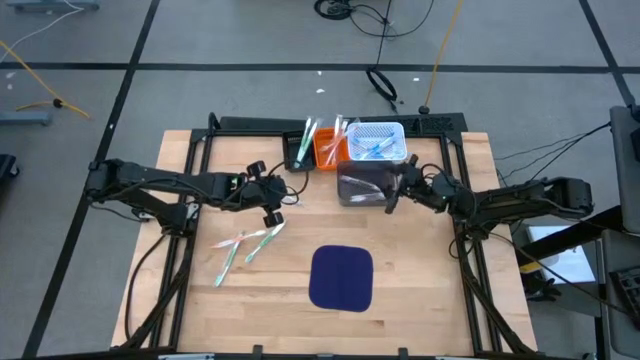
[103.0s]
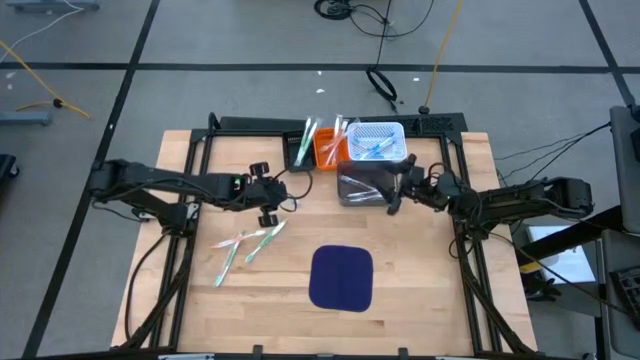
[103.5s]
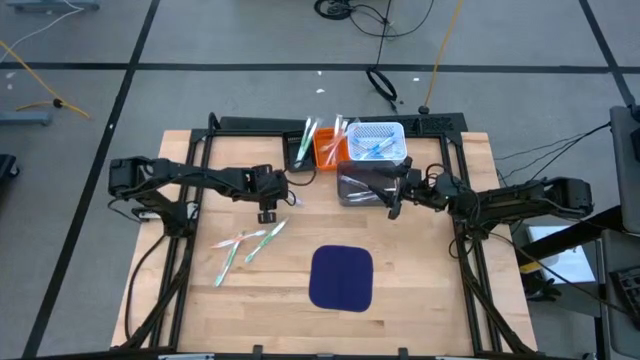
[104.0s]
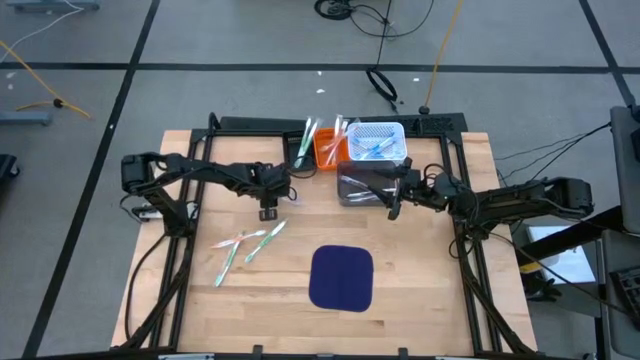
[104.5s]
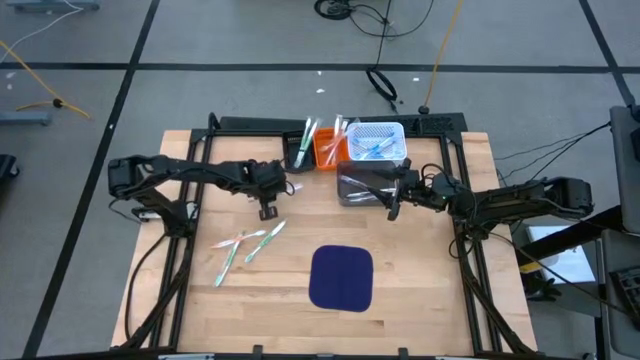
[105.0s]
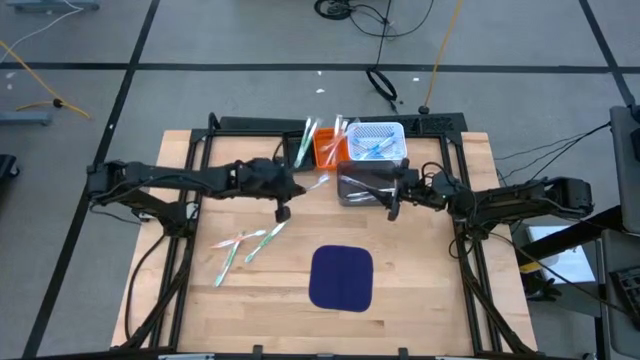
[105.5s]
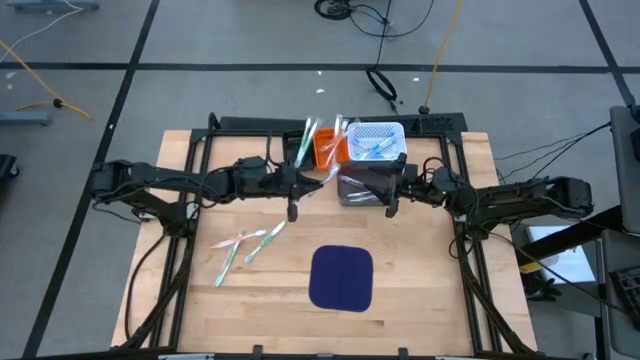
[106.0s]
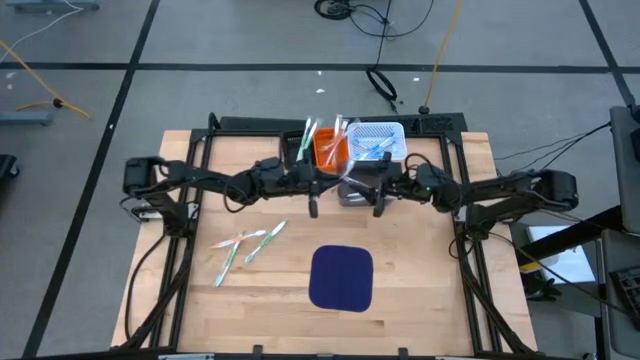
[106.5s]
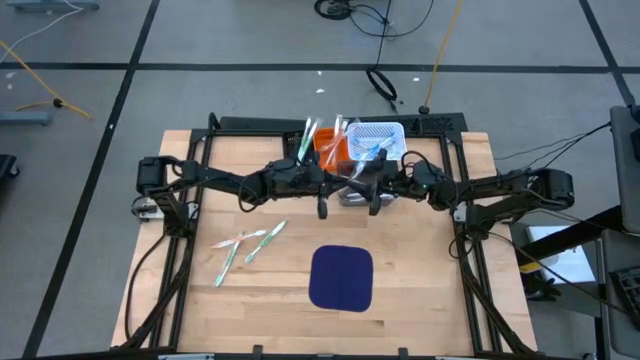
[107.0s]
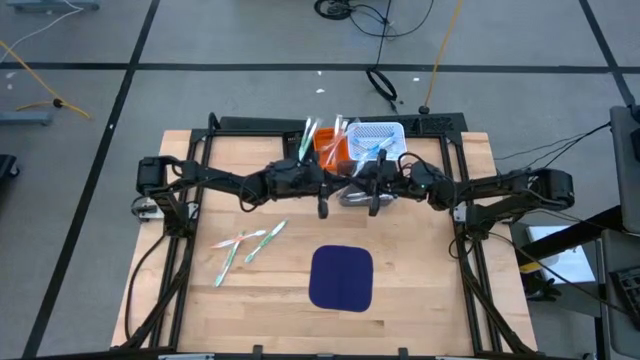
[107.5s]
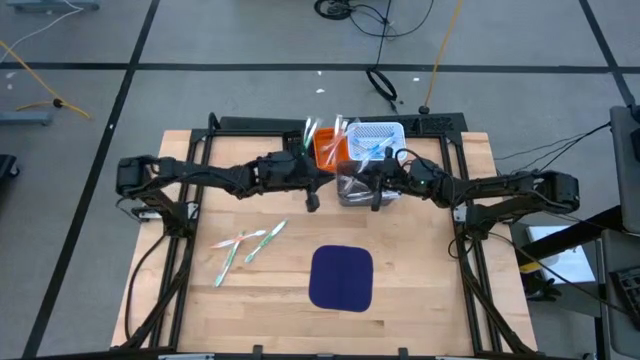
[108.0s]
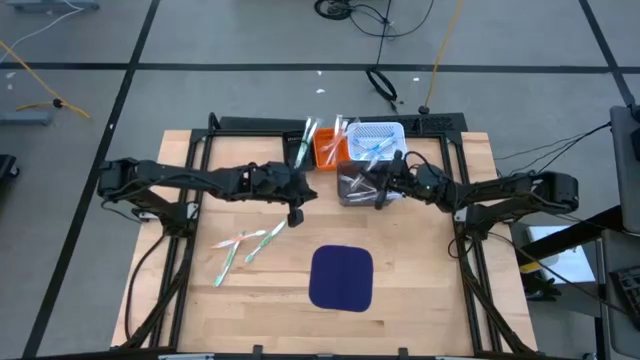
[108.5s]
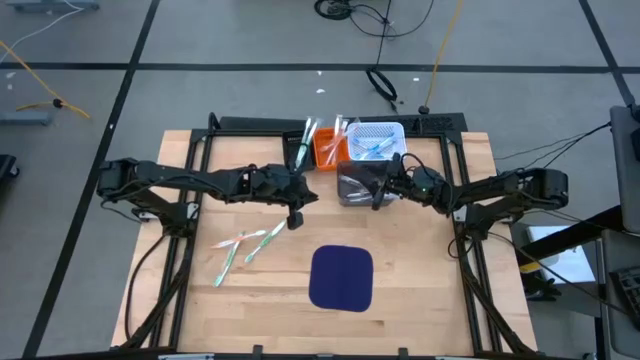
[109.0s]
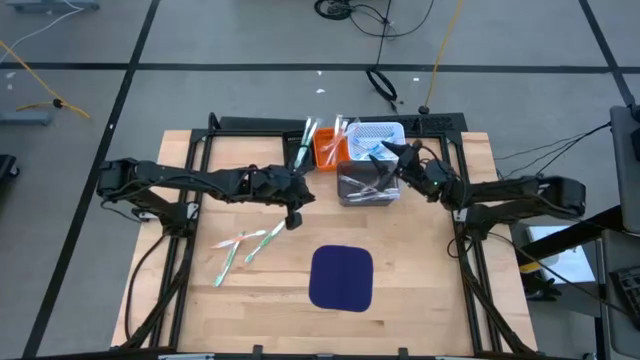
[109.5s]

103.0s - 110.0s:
Task: Pick & Place Toothbrushes
Put the violet toothbrush into the gray basket

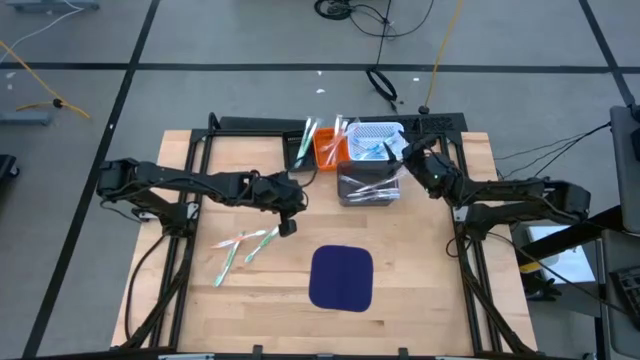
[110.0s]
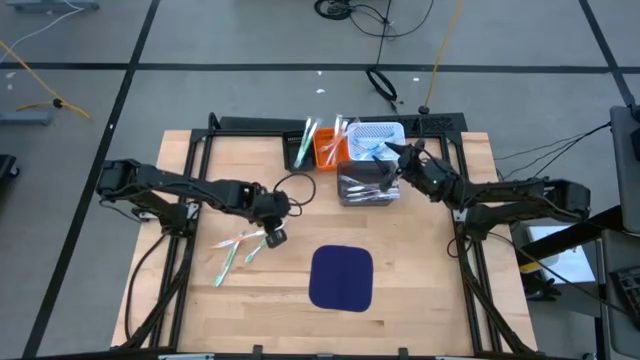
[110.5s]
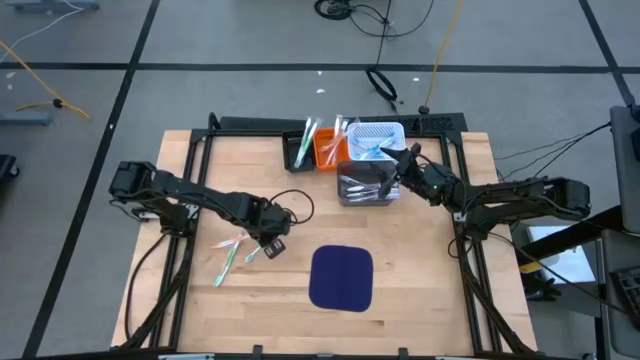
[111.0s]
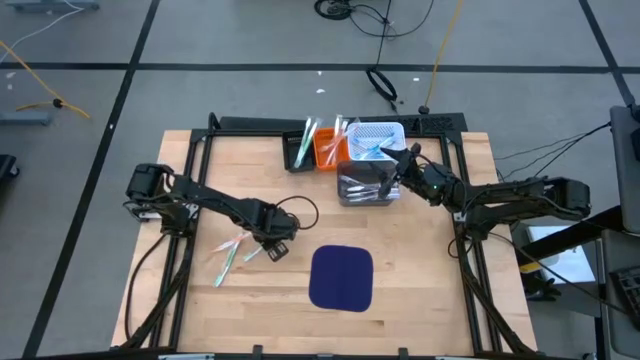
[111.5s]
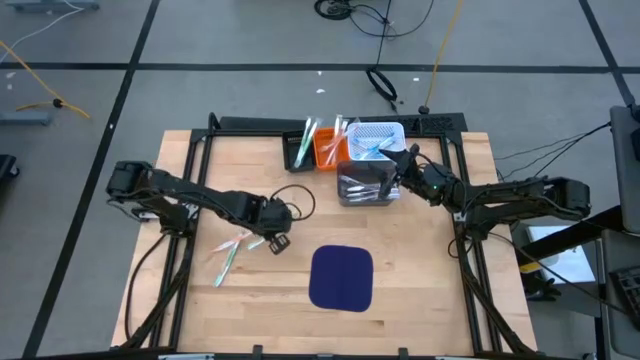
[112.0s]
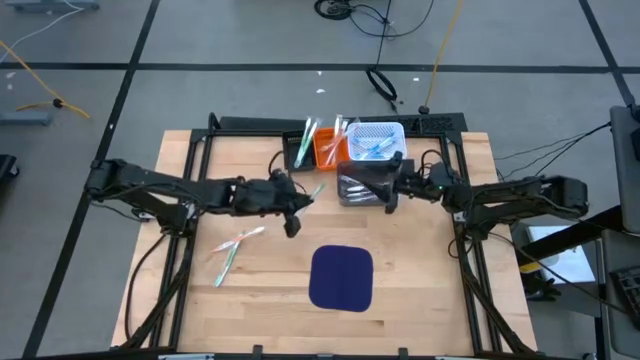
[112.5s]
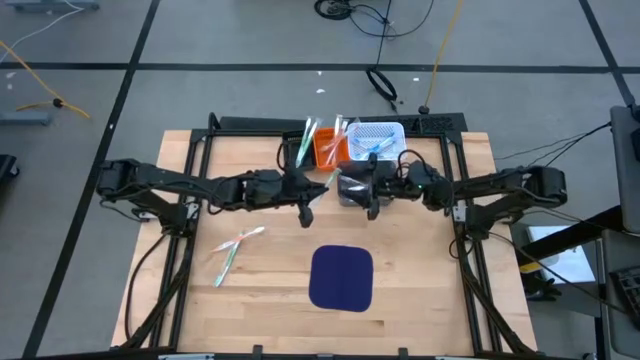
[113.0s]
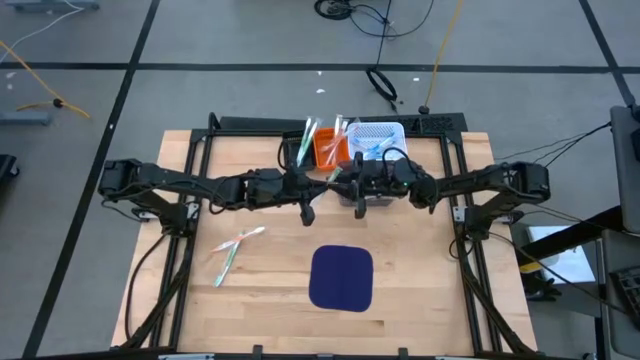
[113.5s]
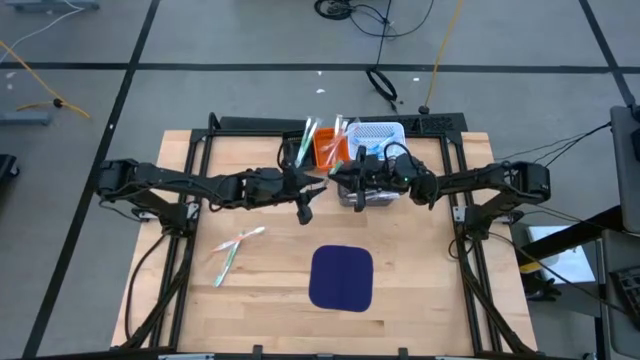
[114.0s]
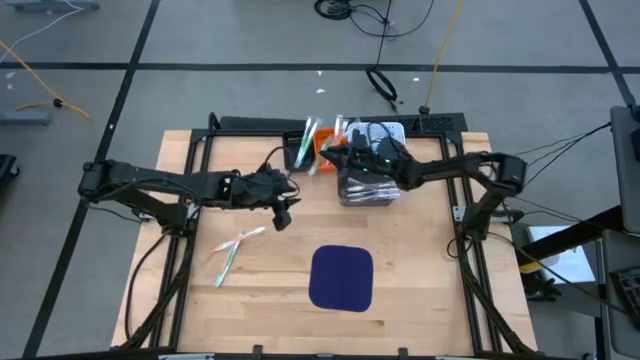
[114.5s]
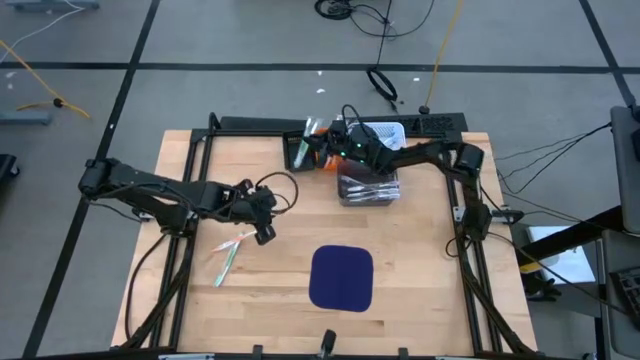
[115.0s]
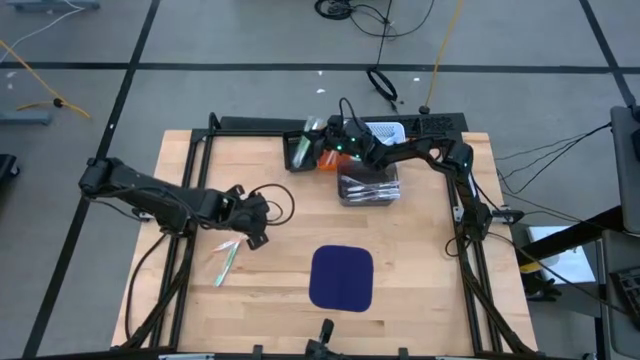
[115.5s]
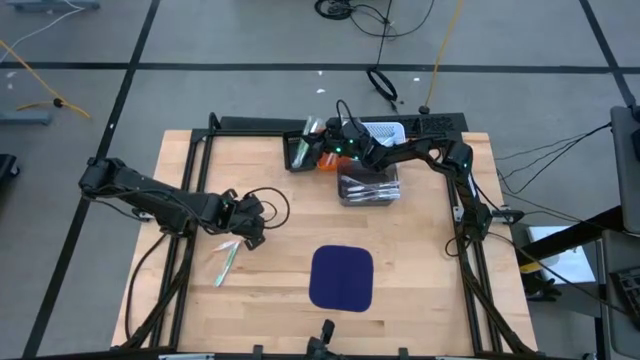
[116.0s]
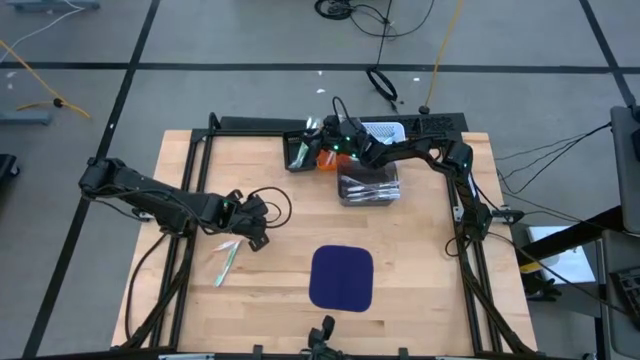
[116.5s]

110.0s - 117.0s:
Put the green toothbrush into the black basket

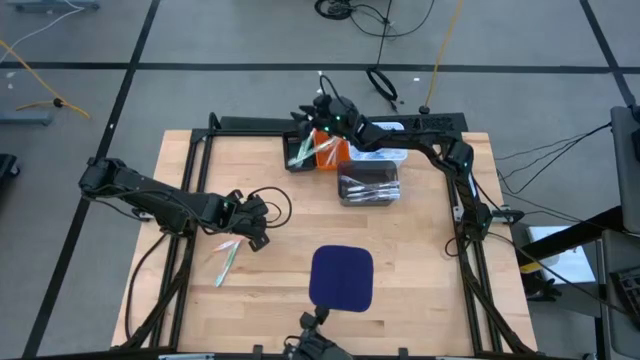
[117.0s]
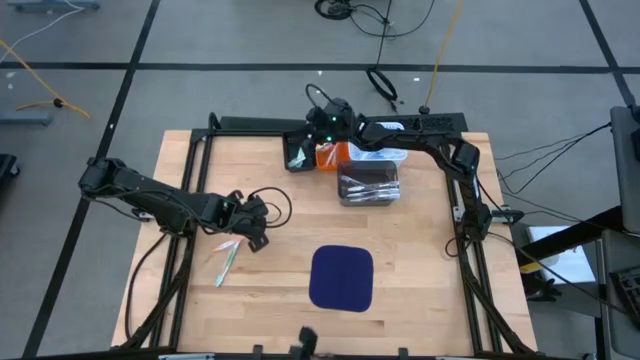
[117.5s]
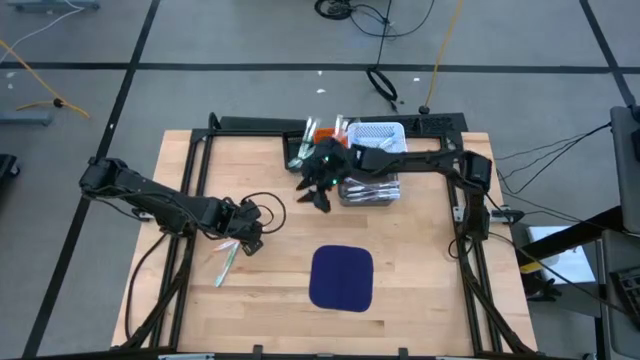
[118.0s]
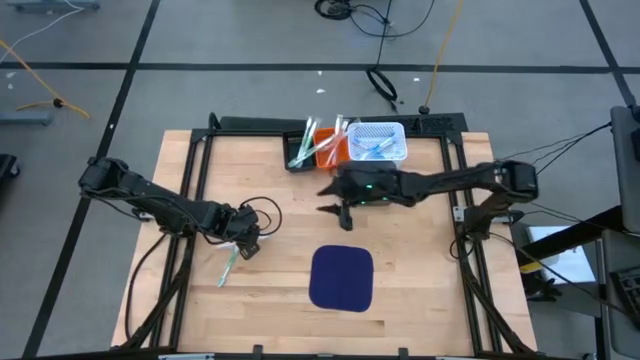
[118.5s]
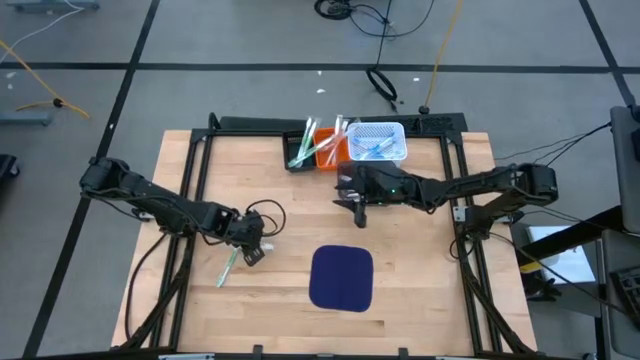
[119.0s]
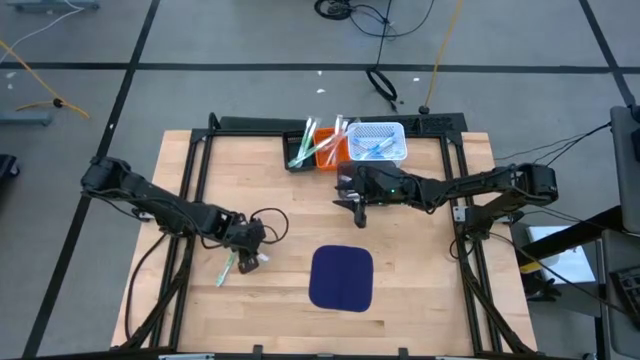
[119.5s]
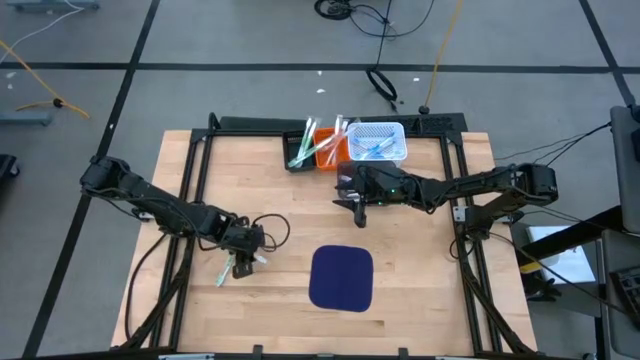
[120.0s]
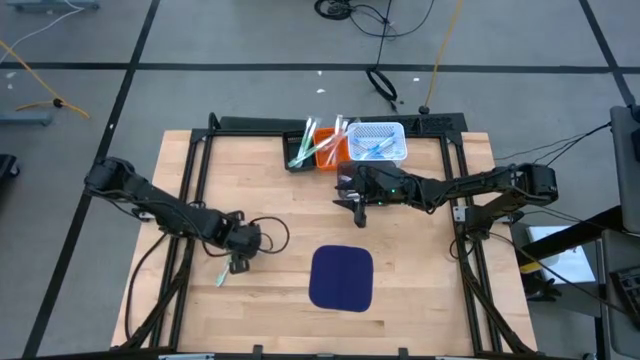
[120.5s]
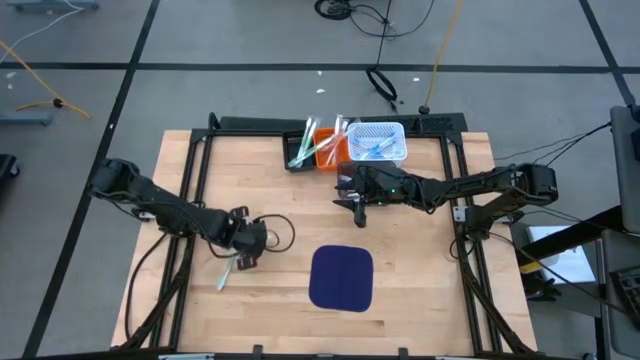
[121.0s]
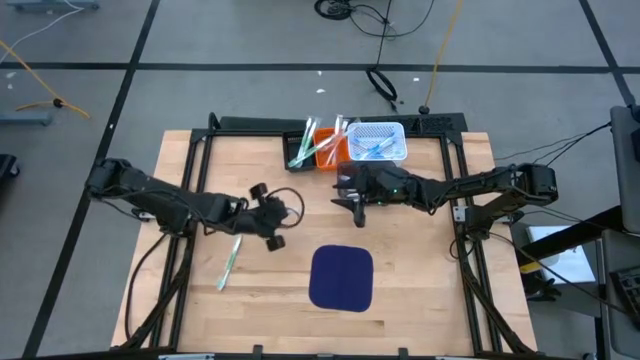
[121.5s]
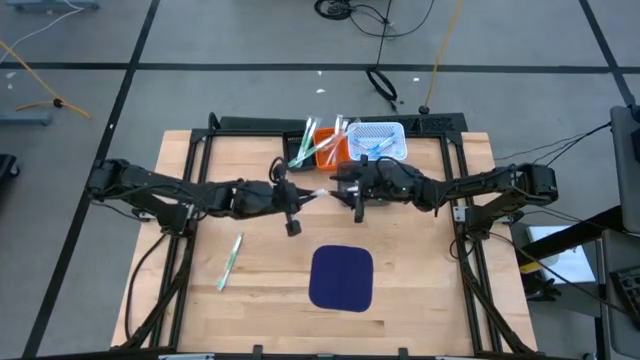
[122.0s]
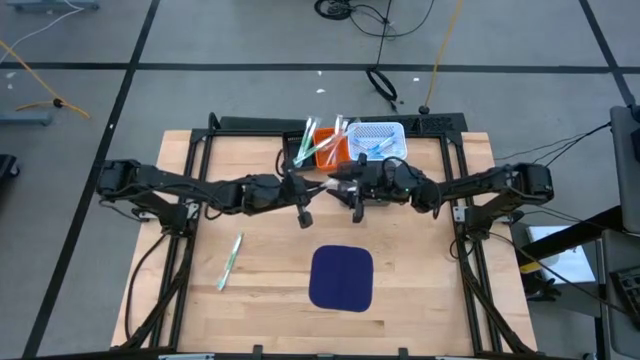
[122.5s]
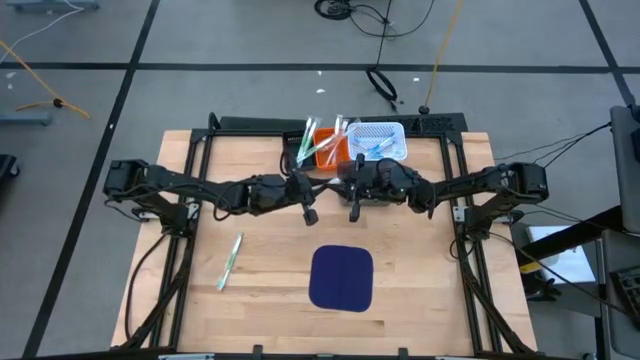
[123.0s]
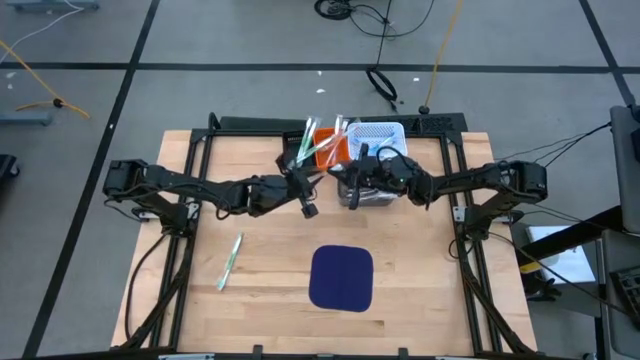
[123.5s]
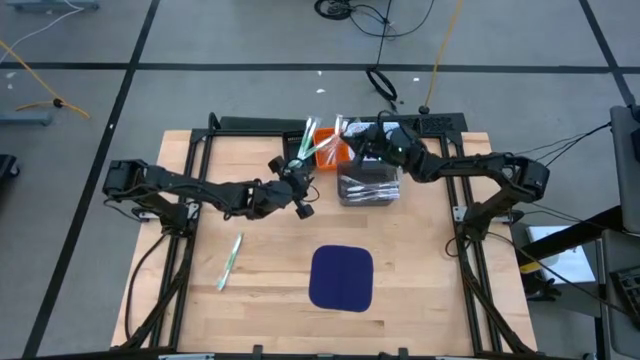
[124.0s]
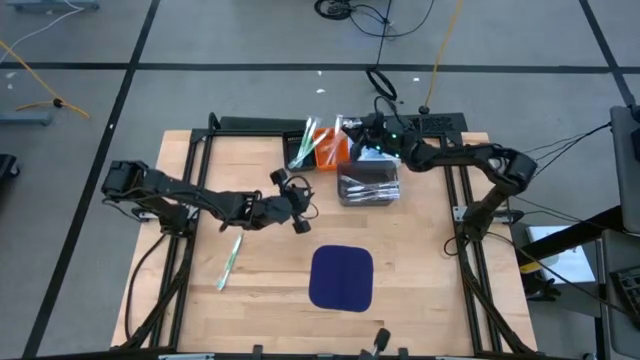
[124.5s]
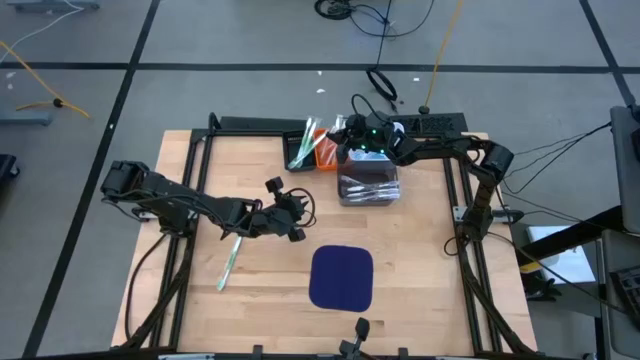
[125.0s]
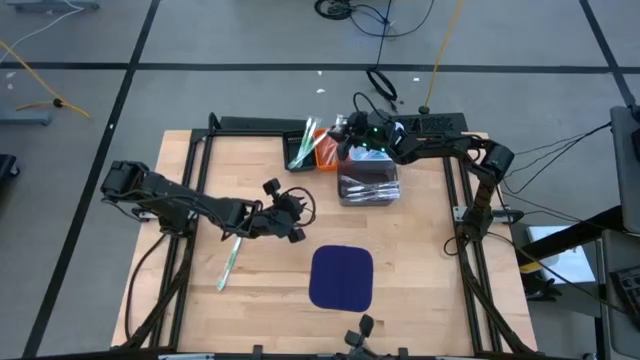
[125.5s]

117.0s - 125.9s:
Put the orange toothbrush into the orange basket
